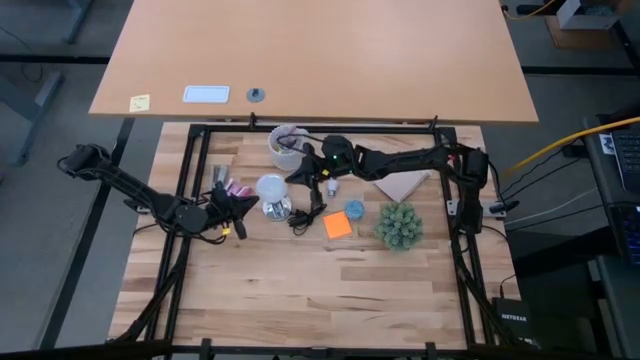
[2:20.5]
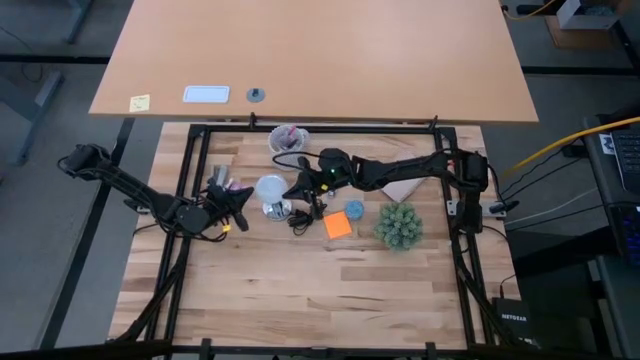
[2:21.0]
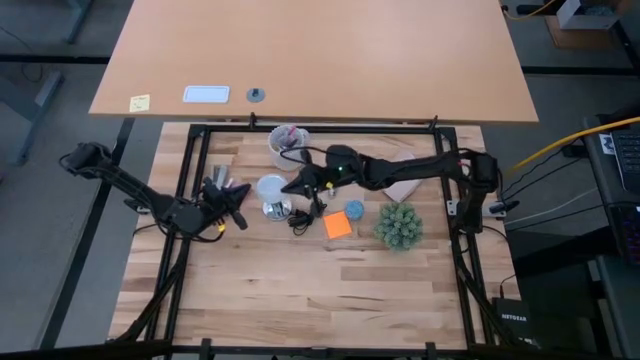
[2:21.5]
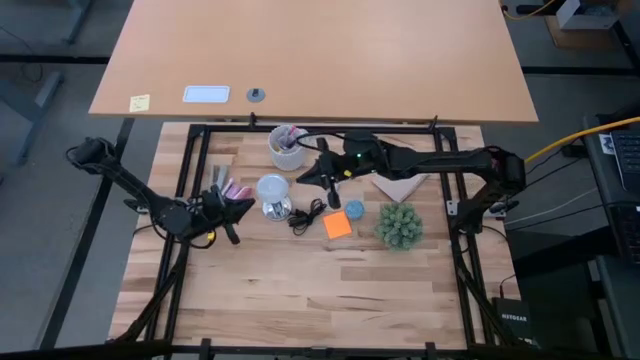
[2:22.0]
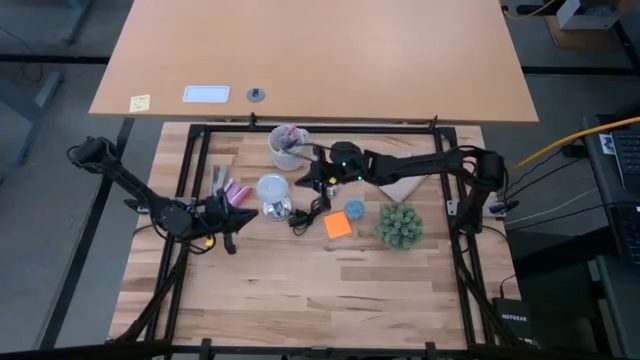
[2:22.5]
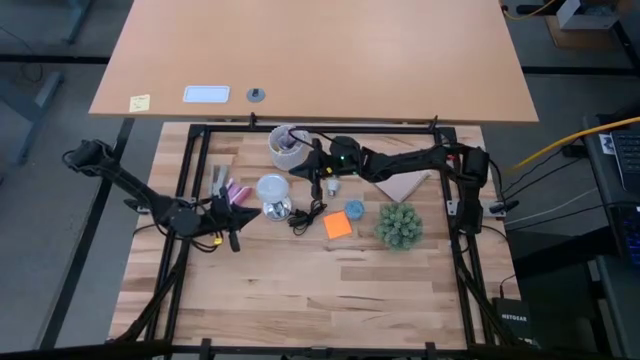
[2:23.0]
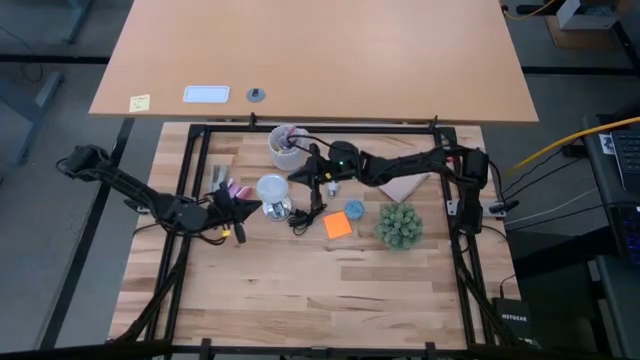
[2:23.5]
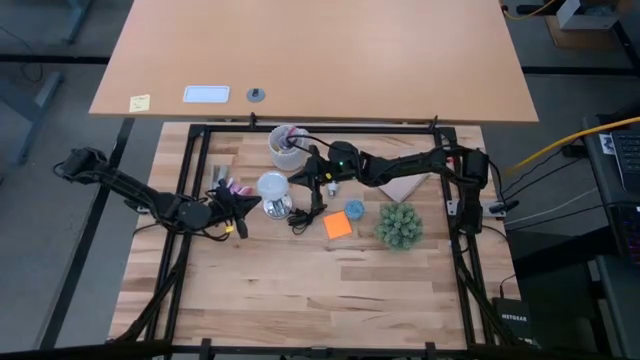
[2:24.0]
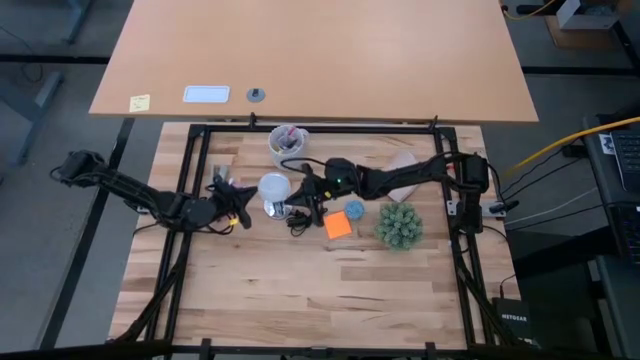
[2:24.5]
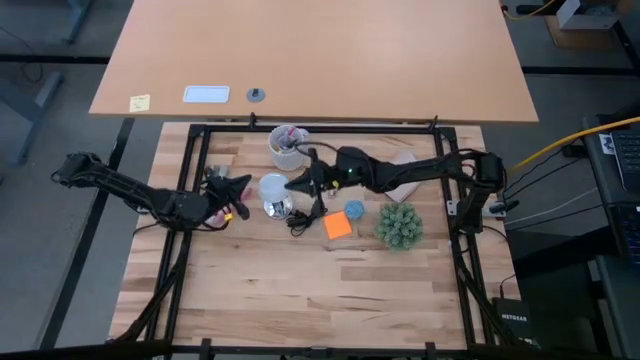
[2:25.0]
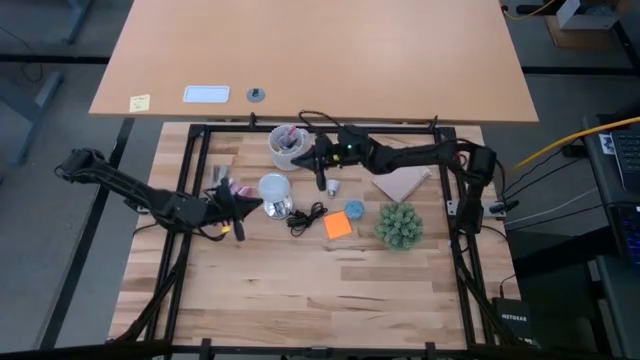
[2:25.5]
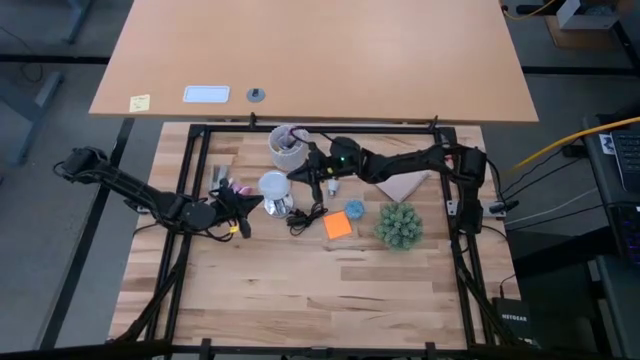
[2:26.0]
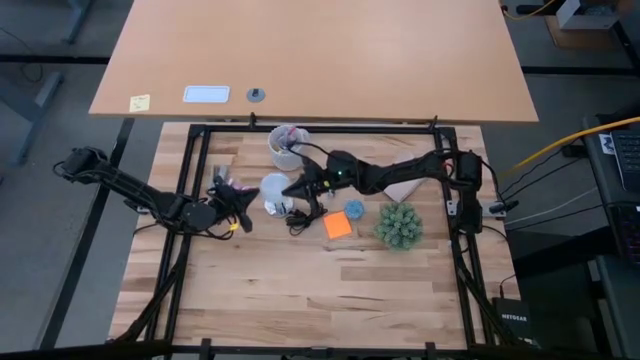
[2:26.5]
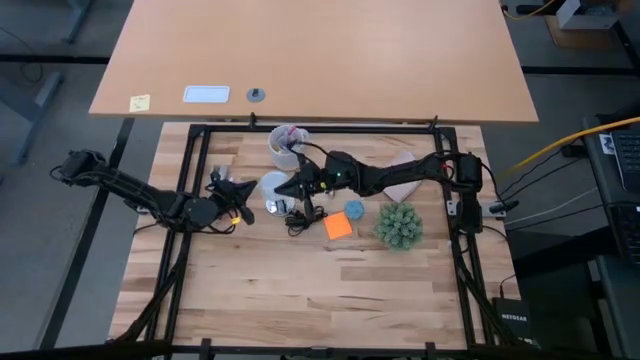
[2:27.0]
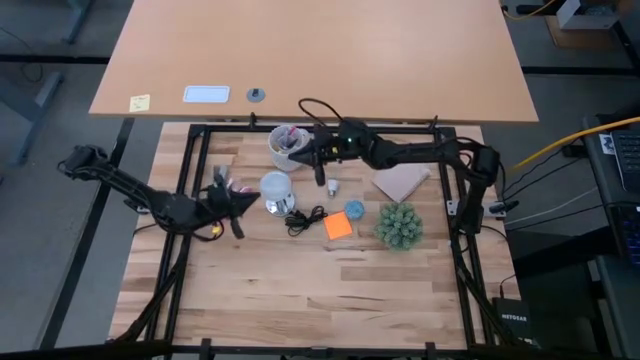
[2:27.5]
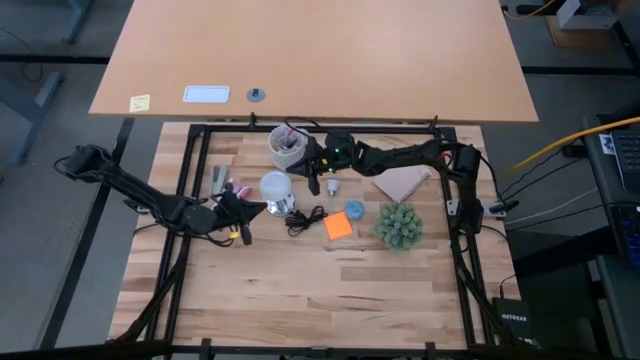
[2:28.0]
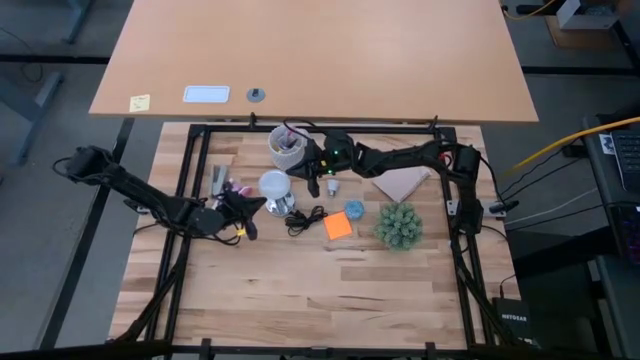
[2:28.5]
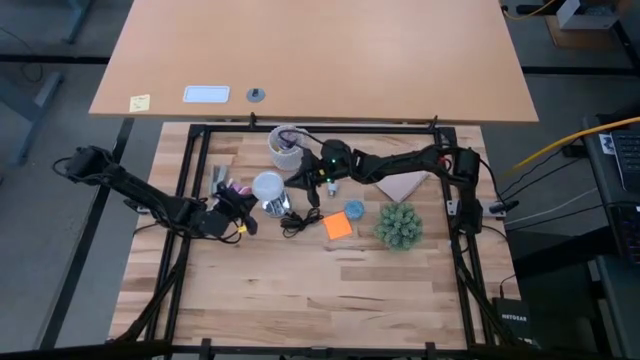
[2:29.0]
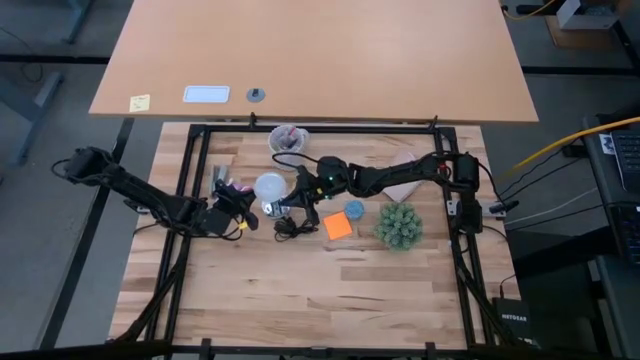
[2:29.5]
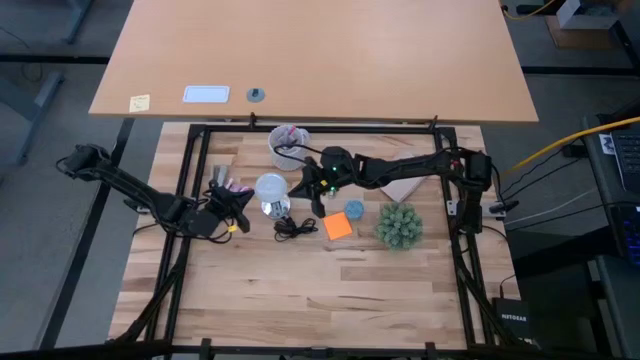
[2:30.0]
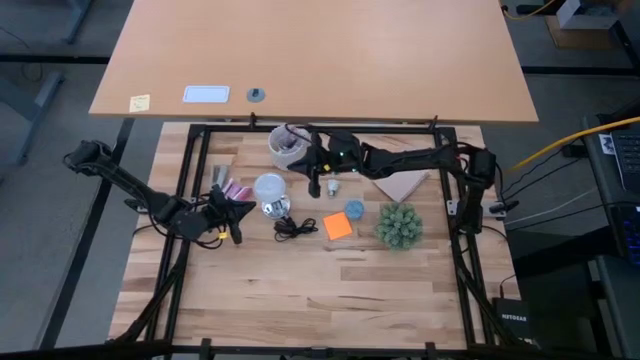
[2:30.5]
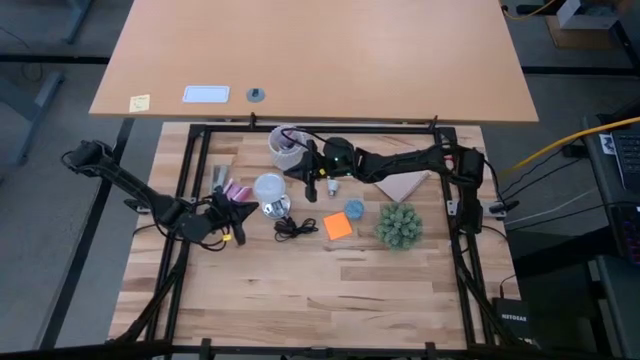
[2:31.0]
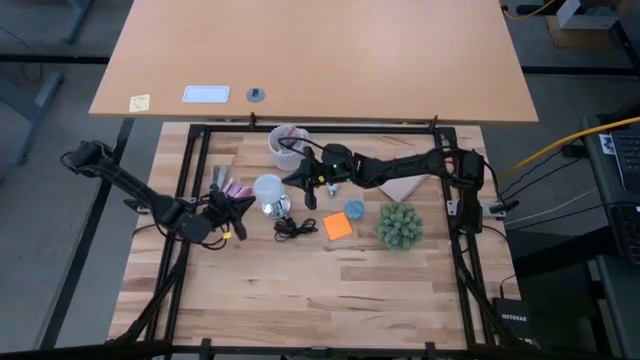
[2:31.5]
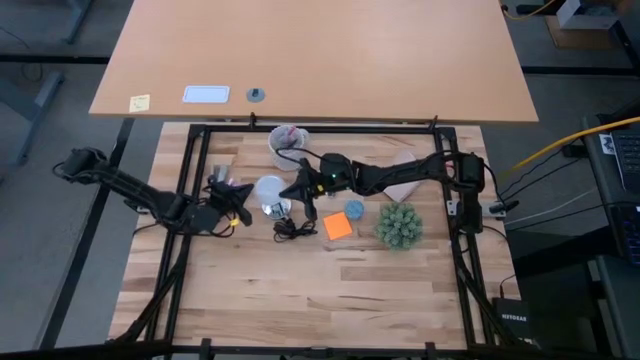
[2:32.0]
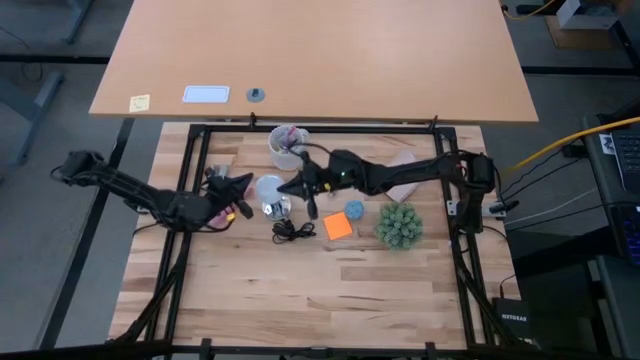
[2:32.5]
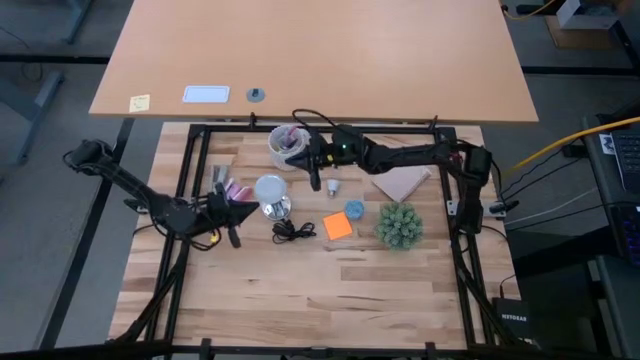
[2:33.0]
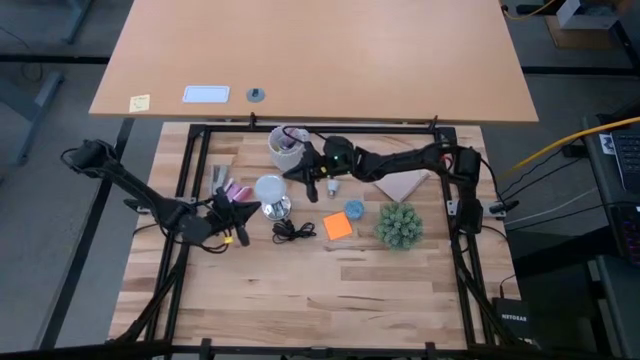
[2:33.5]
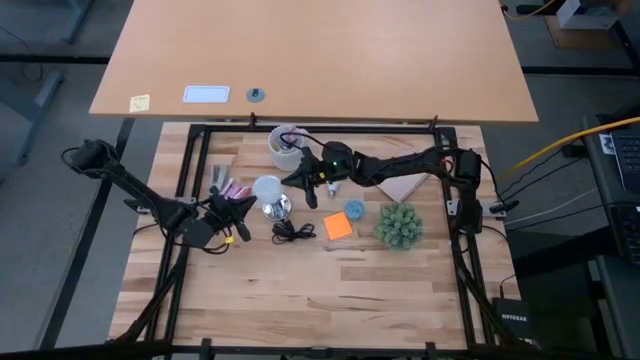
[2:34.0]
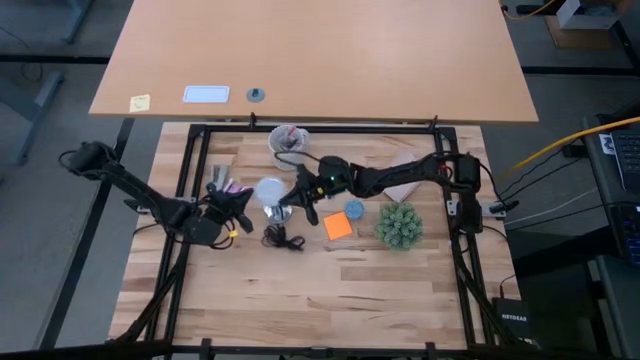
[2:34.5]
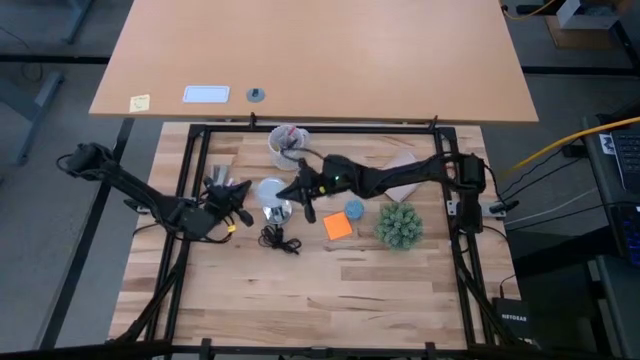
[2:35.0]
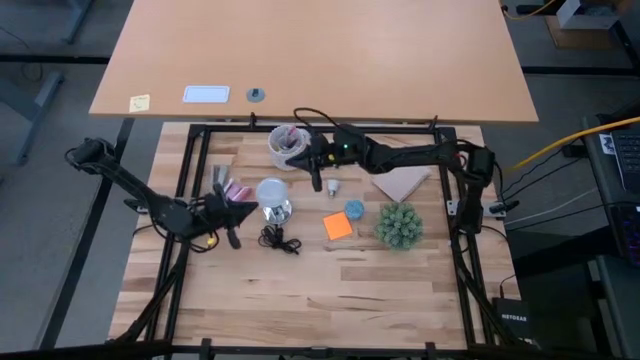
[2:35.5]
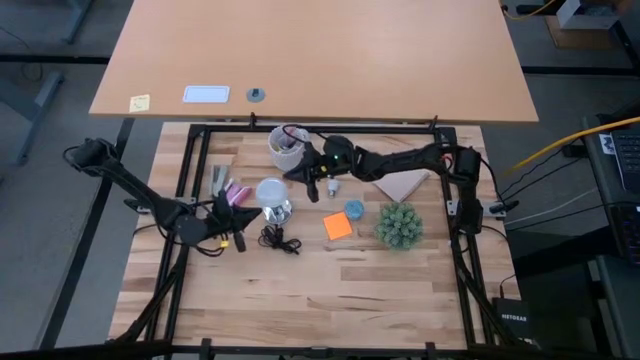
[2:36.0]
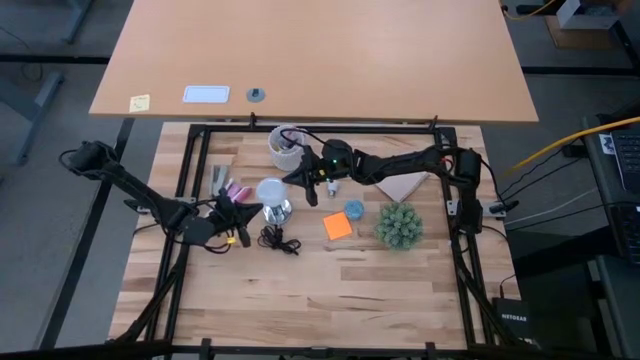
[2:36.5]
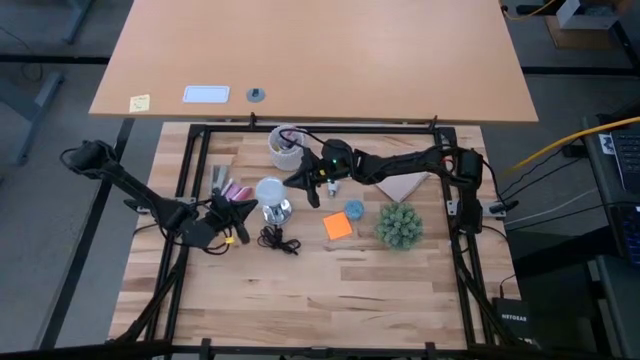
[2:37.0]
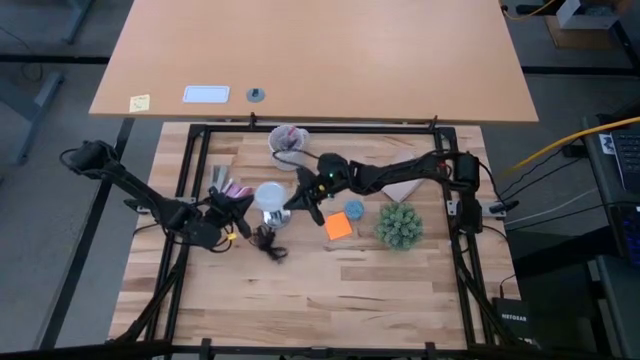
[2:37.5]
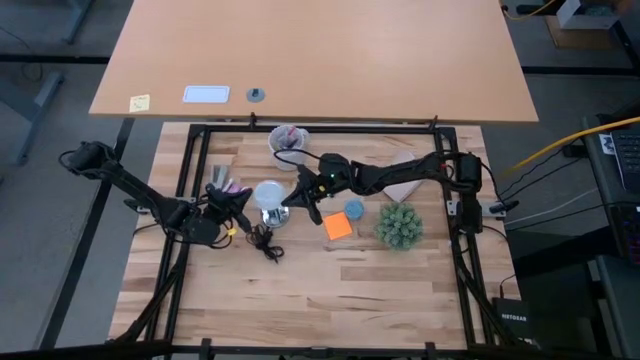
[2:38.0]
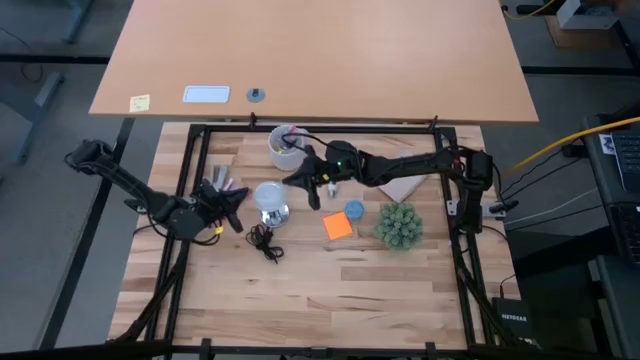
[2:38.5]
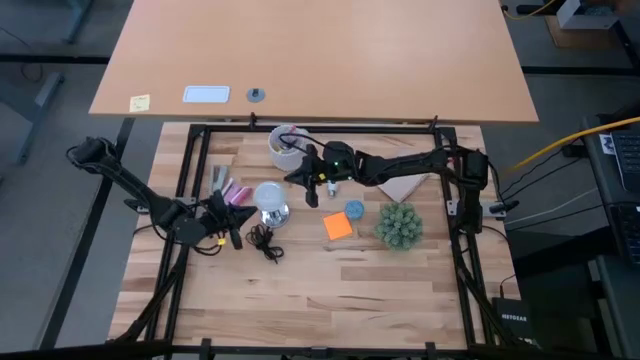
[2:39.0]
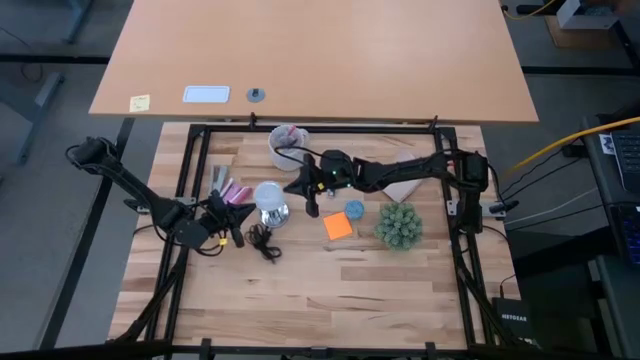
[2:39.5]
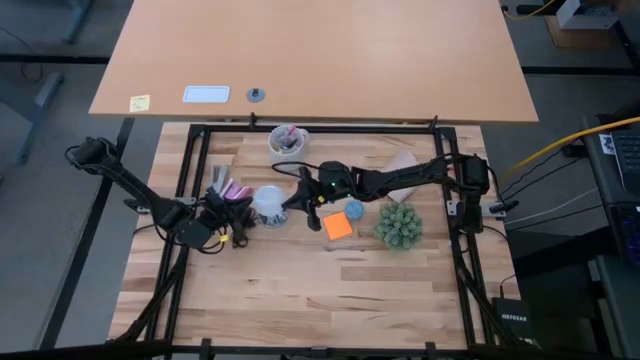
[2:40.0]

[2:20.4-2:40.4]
Task: Screw lightbulb
Insert the lightbulb into the silver lamp

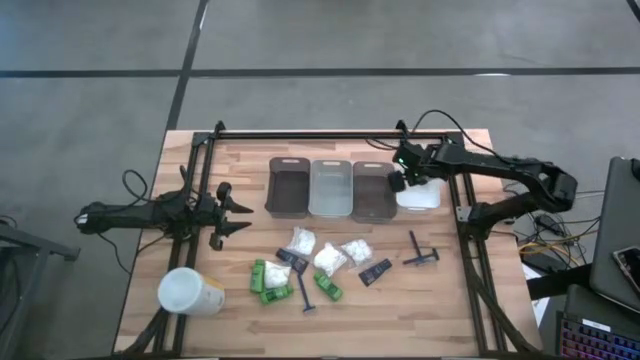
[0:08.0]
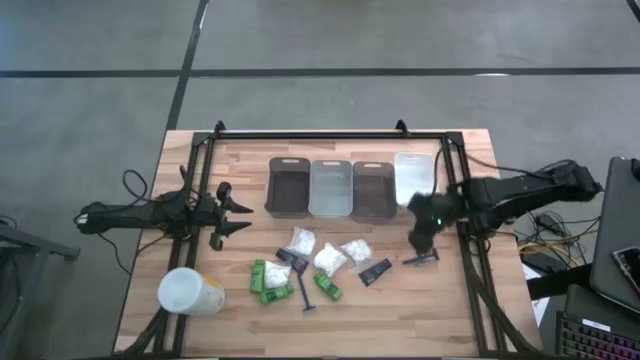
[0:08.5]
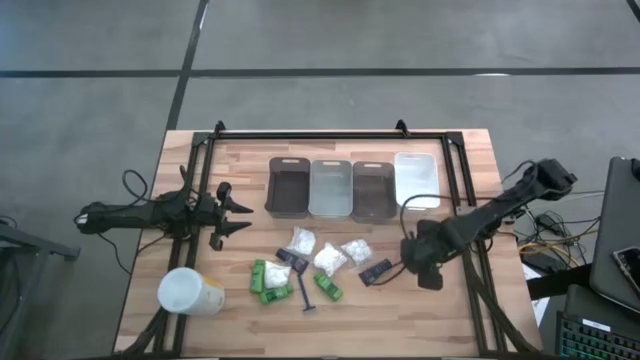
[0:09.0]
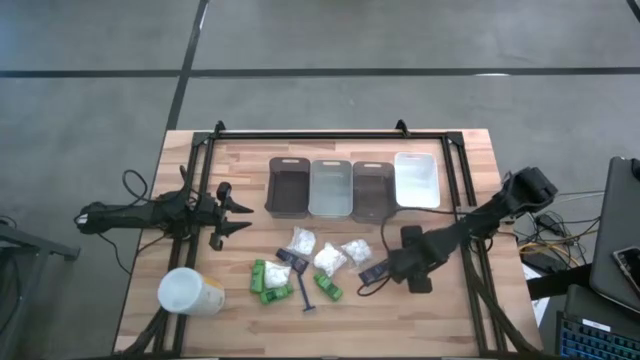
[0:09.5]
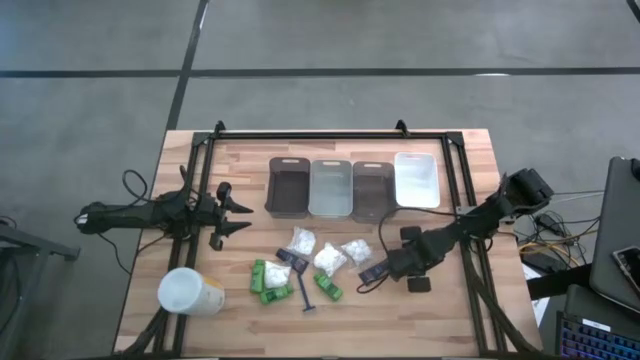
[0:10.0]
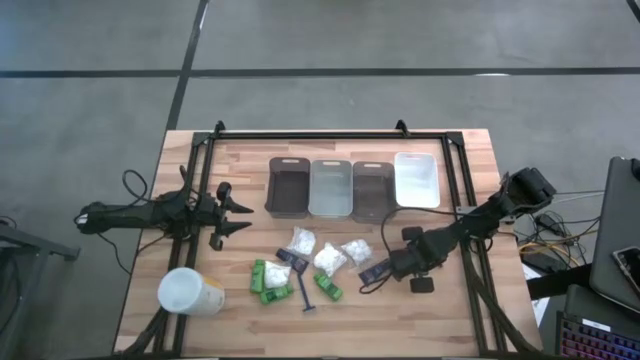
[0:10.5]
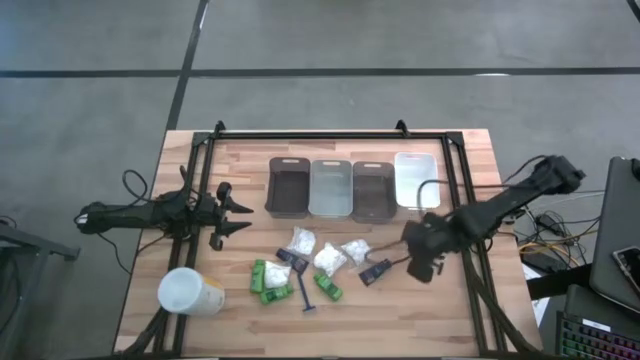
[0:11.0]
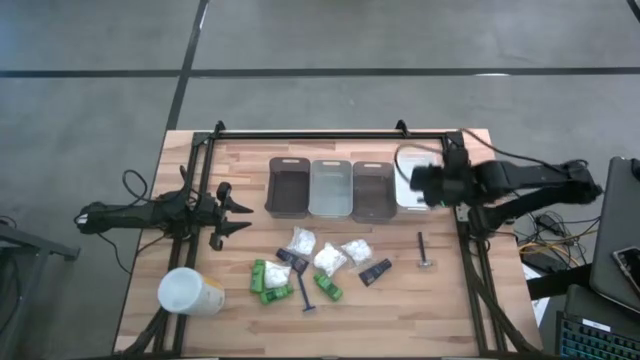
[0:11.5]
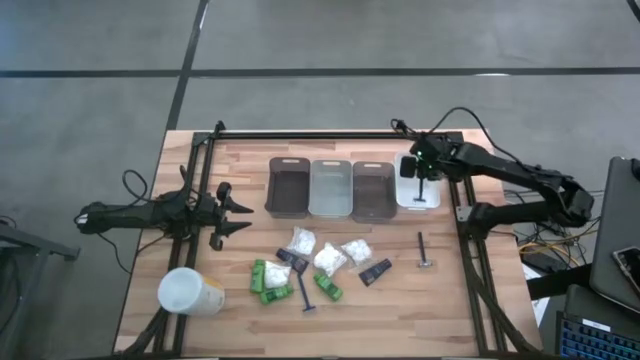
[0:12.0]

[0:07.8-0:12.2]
Task: Pick & Place Travel size toiletries
Put the top right blue razor into the white bin
